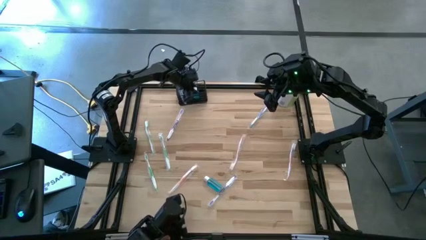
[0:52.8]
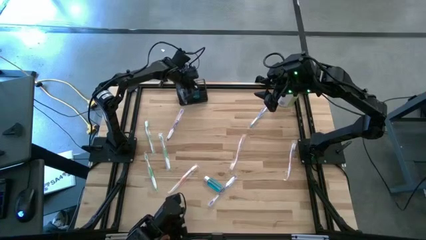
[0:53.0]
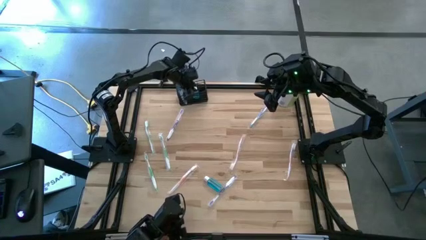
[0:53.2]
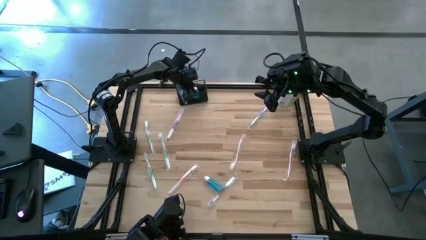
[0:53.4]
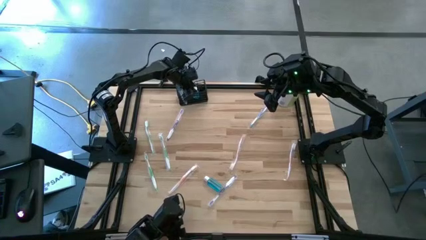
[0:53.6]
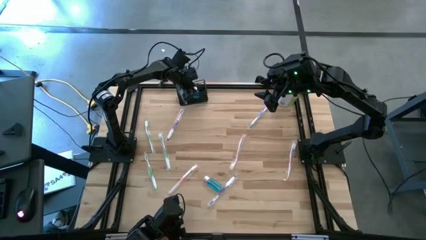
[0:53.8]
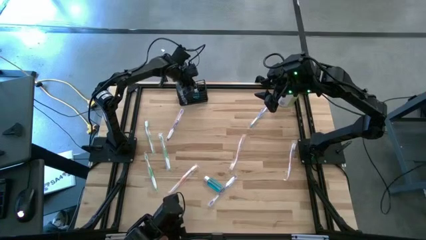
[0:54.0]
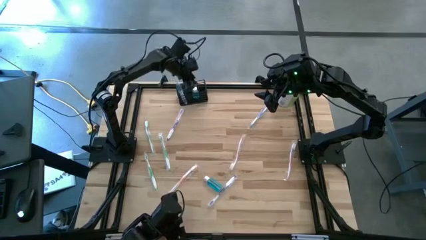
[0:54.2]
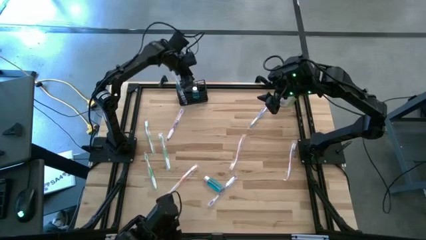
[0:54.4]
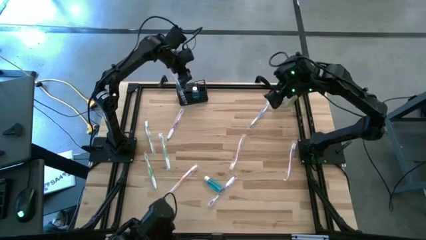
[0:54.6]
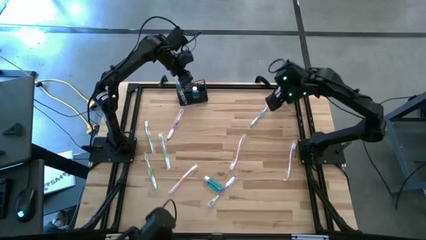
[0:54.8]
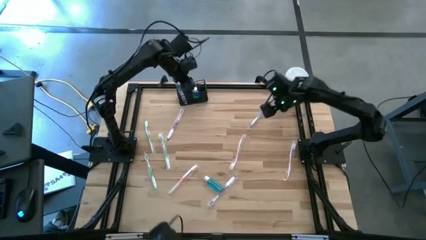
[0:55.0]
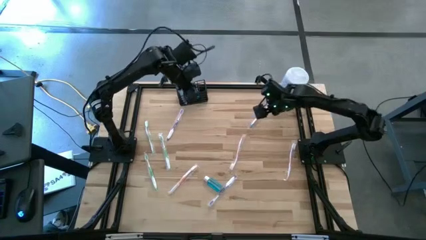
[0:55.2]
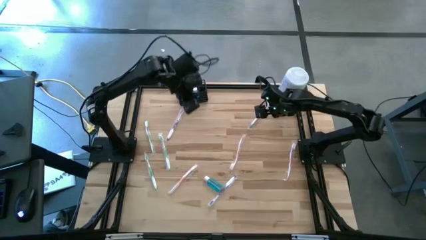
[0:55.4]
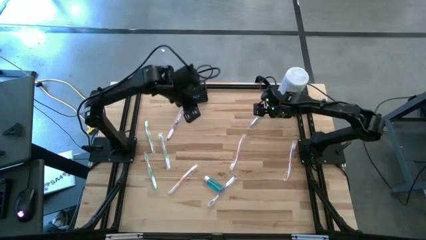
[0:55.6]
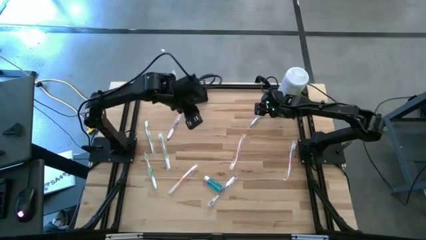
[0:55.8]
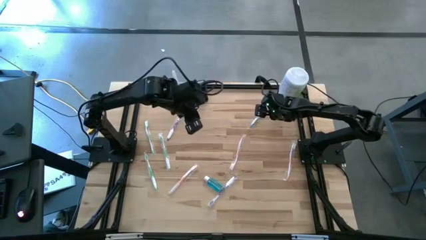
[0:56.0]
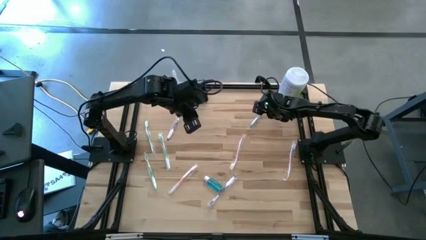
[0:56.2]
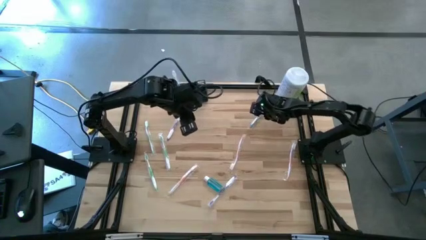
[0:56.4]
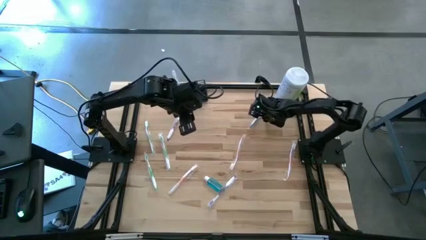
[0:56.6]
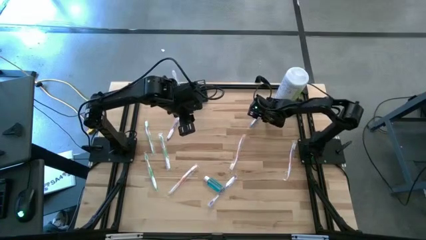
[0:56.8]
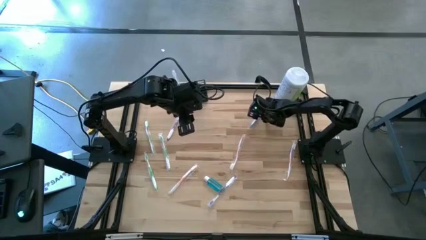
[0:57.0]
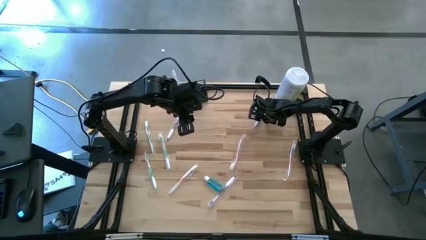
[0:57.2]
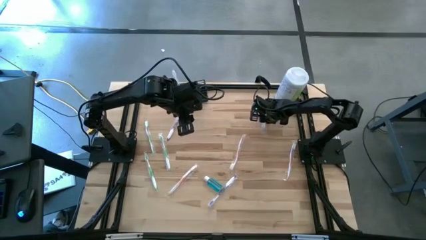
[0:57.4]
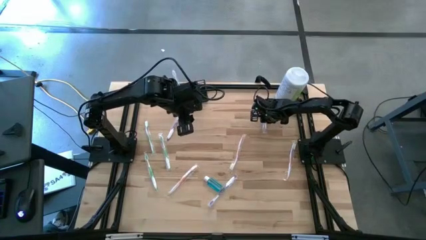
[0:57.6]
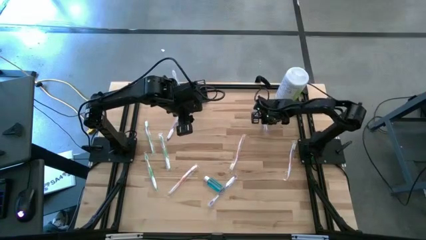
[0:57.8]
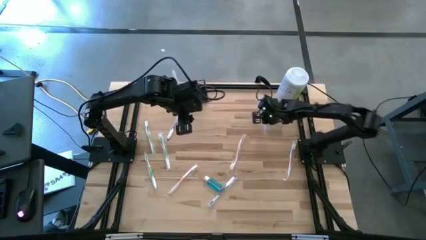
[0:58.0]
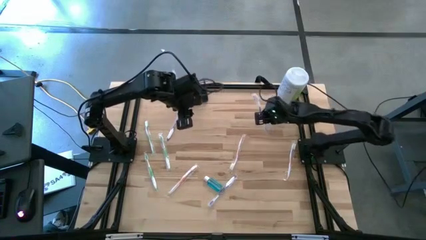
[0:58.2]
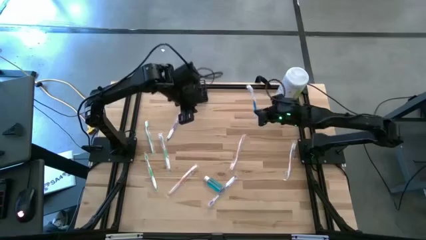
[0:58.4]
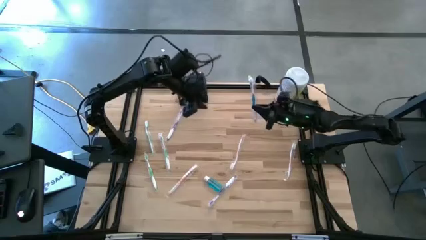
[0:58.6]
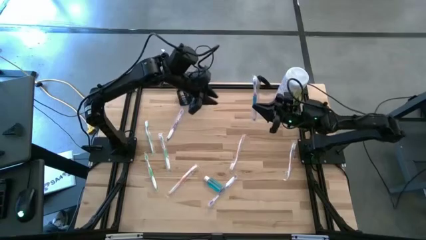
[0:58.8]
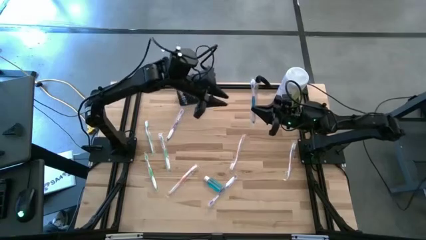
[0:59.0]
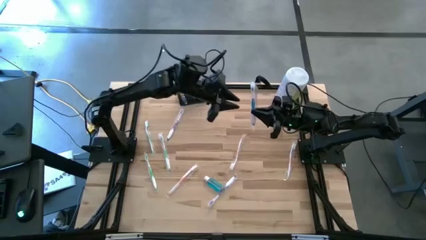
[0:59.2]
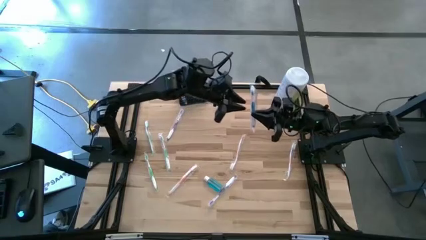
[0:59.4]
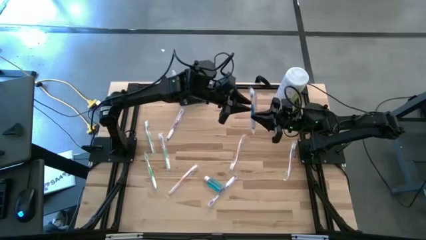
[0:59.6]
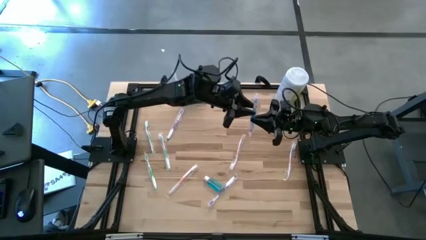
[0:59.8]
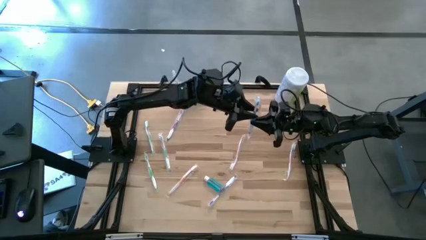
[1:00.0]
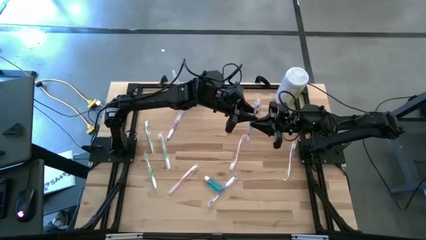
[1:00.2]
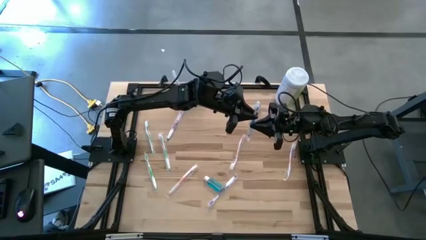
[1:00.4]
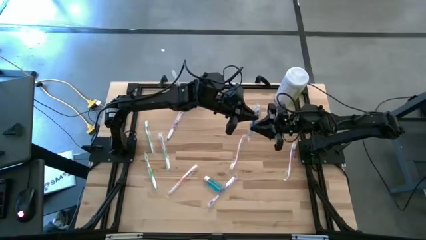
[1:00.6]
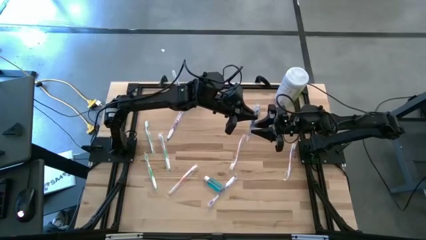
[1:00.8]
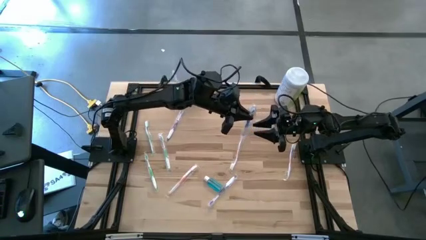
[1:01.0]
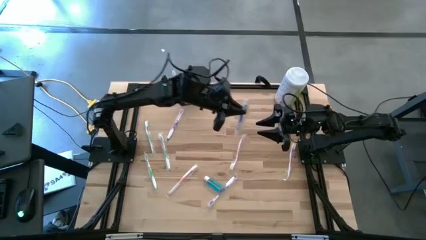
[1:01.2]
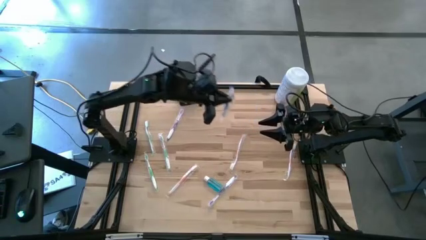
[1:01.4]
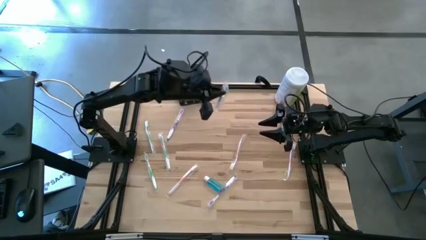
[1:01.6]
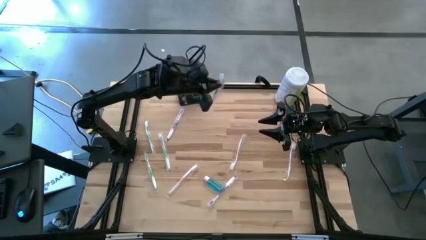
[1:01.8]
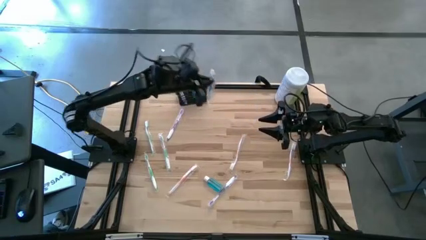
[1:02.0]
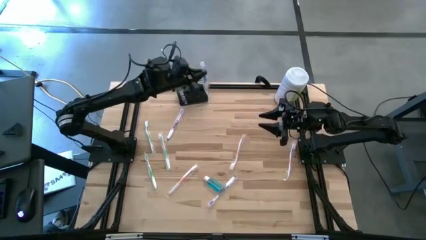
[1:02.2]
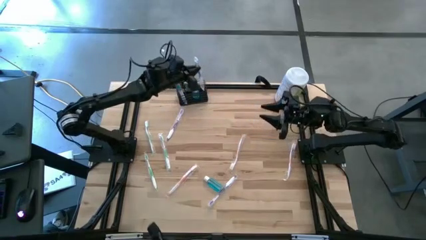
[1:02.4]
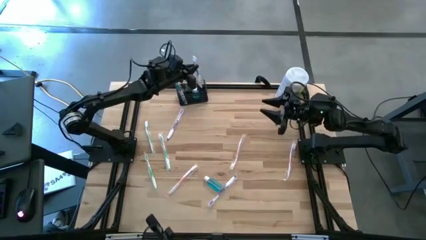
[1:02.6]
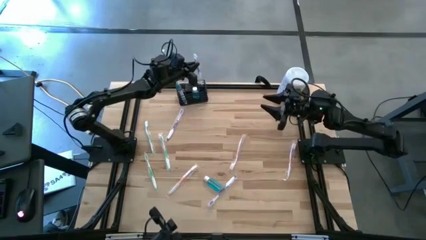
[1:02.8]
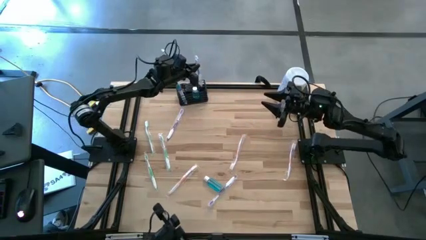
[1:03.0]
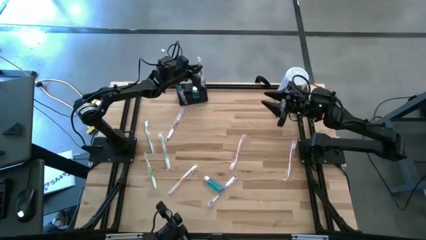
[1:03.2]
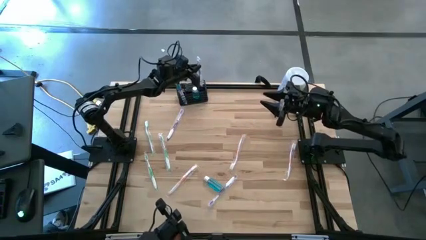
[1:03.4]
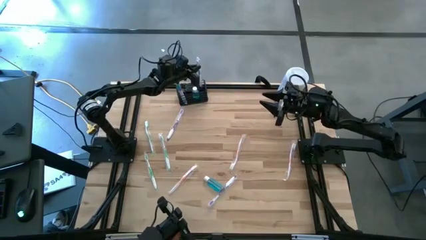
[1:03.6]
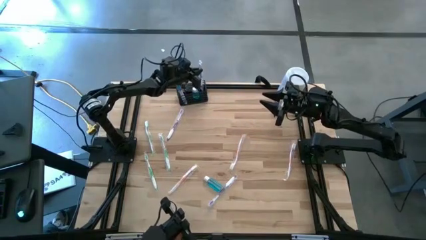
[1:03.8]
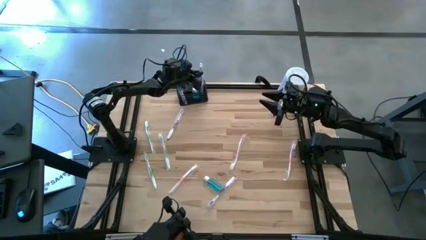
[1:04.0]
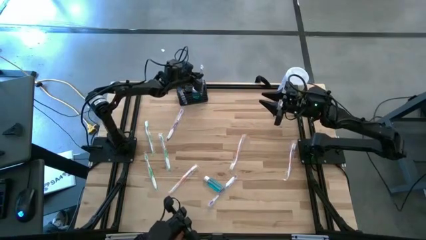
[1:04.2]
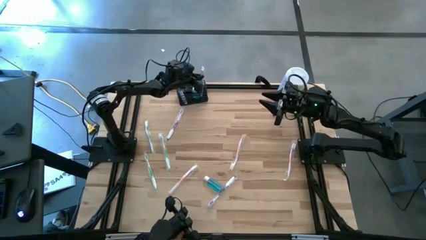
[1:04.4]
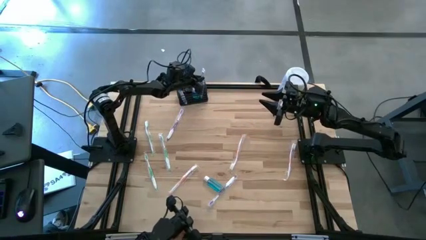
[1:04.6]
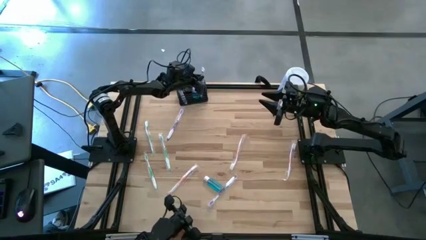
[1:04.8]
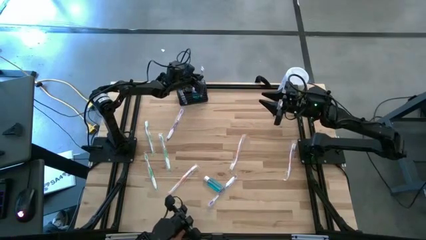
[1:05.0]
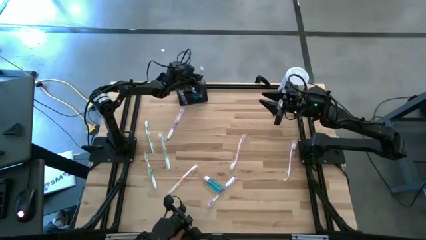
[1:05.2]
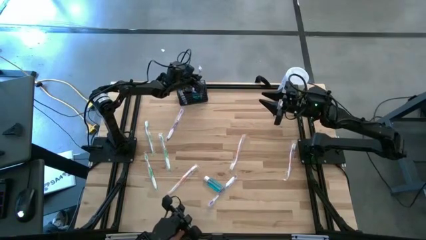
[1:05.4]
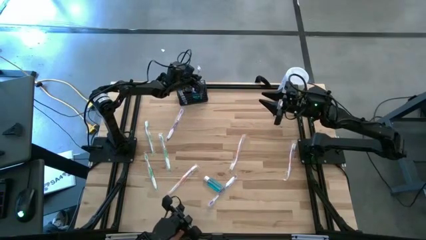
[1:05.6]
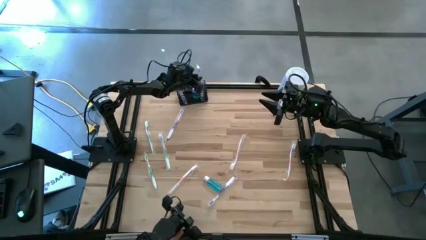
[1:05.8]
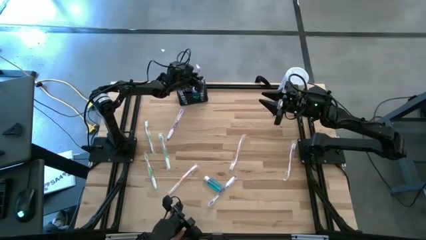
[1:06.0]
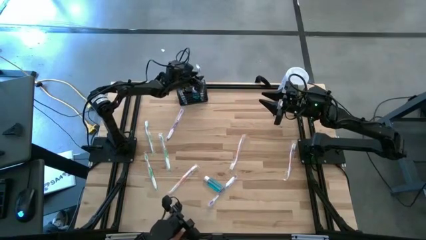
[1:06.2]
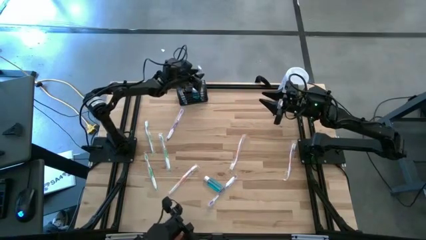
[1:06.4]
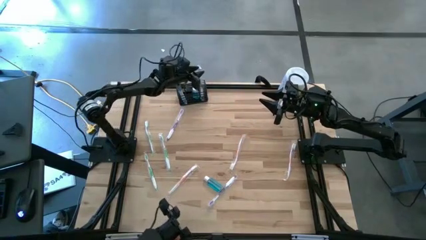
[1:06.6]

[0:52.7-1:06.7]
Task: Pick & Place toothbrushing station
Put the blue toothbrush into the black wire organizer
